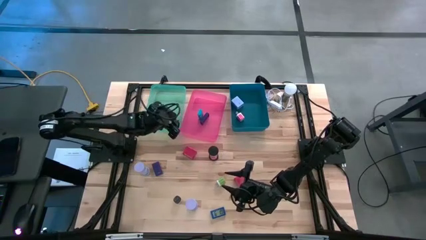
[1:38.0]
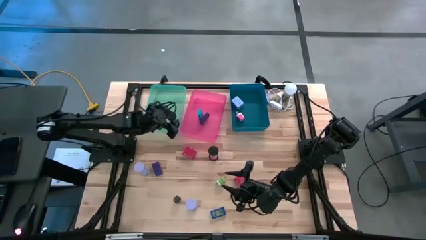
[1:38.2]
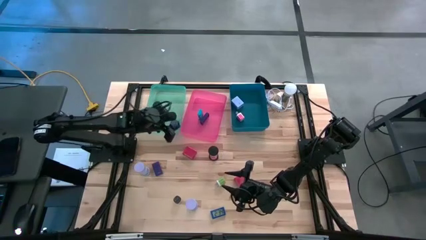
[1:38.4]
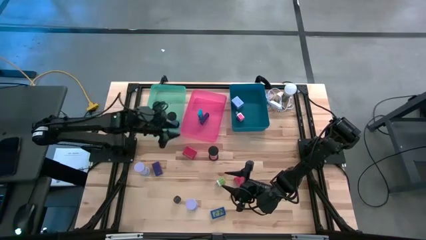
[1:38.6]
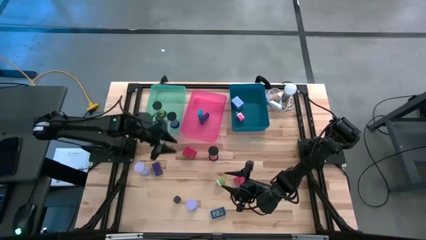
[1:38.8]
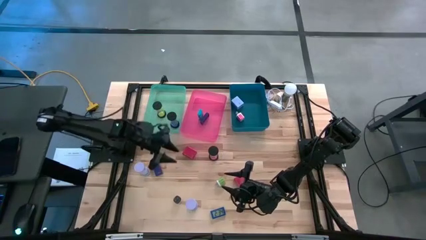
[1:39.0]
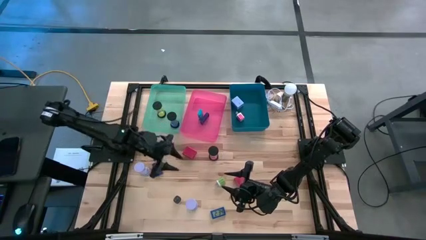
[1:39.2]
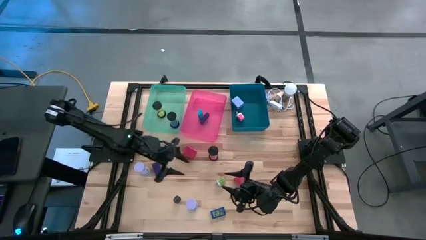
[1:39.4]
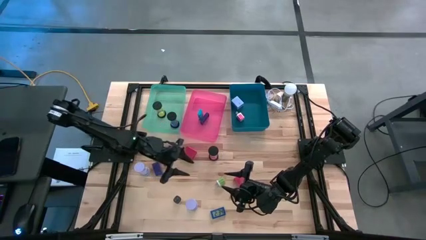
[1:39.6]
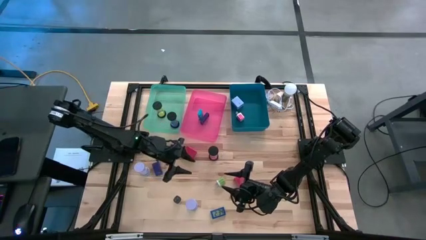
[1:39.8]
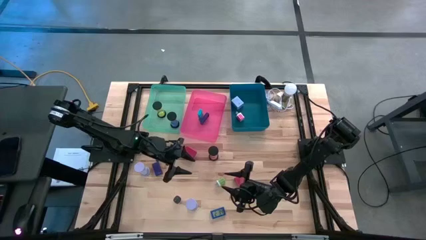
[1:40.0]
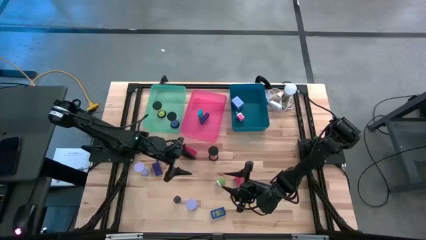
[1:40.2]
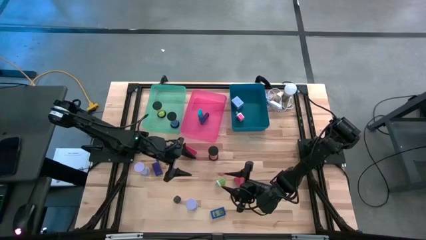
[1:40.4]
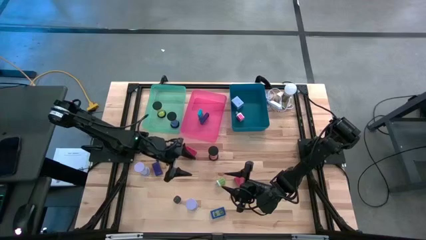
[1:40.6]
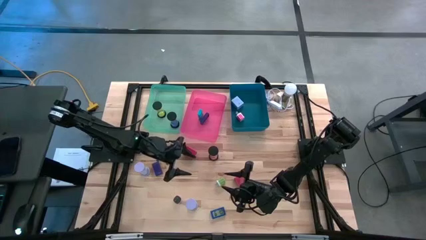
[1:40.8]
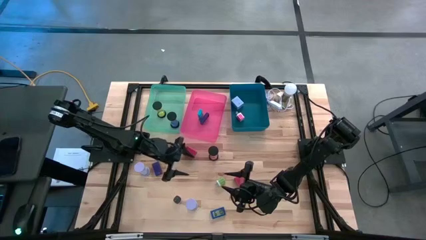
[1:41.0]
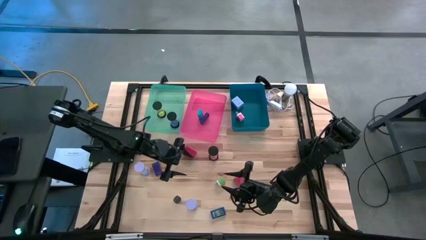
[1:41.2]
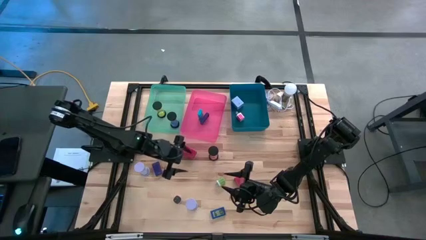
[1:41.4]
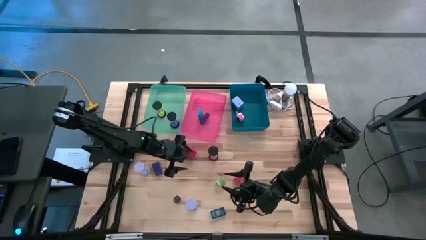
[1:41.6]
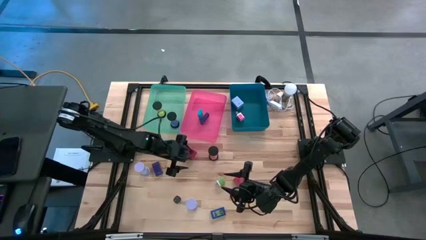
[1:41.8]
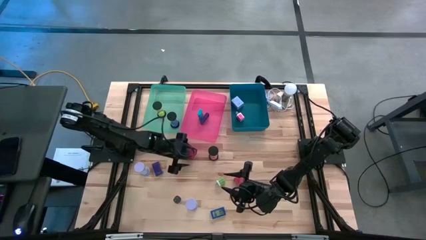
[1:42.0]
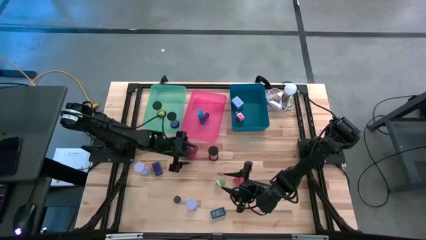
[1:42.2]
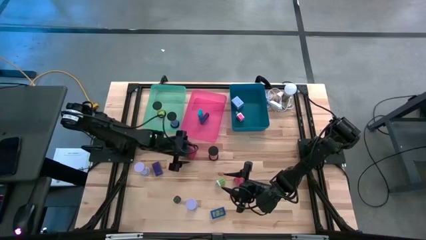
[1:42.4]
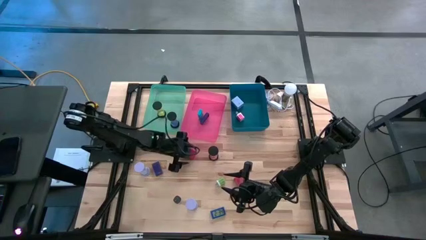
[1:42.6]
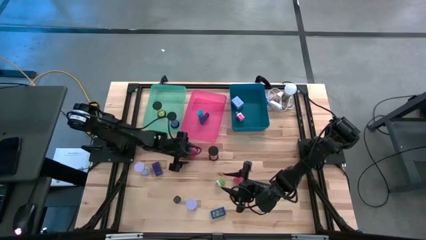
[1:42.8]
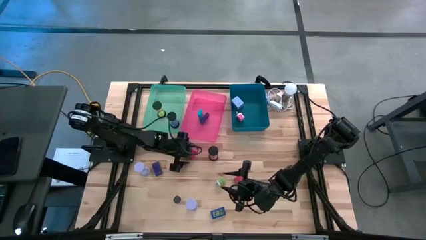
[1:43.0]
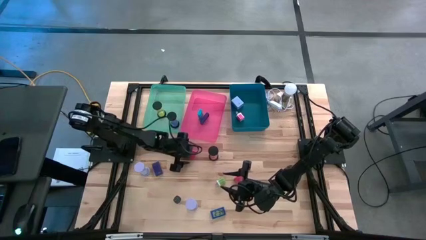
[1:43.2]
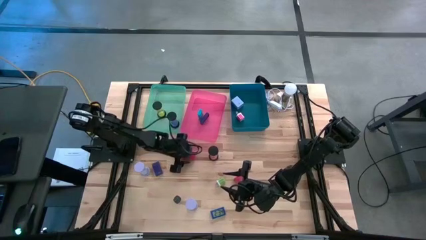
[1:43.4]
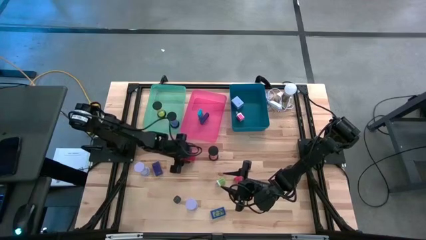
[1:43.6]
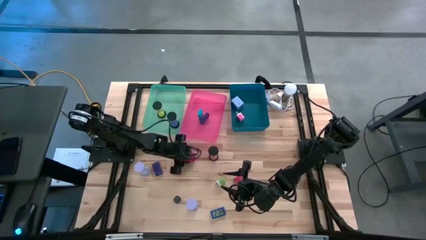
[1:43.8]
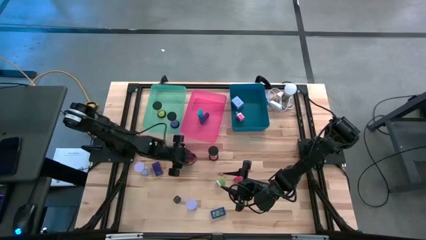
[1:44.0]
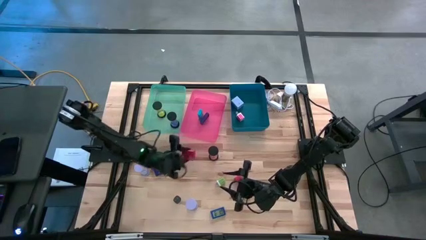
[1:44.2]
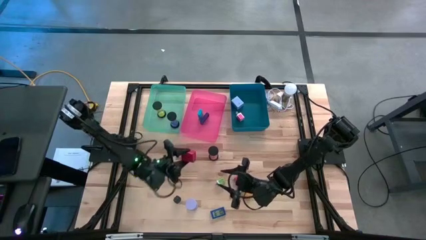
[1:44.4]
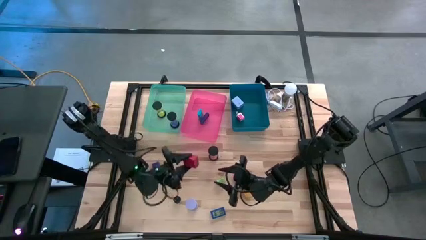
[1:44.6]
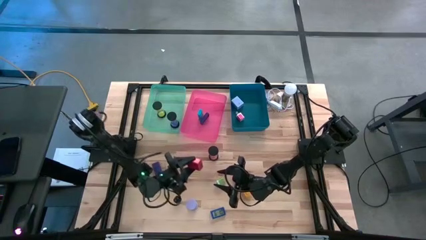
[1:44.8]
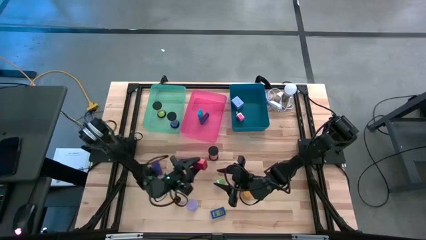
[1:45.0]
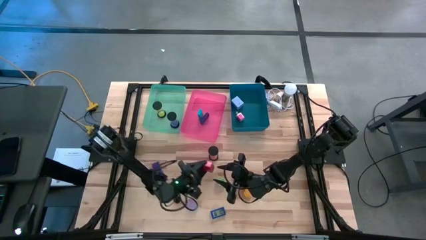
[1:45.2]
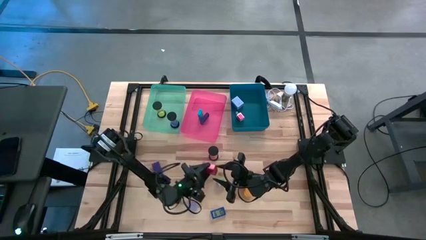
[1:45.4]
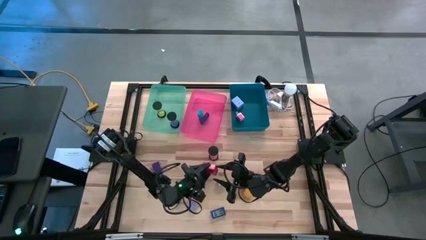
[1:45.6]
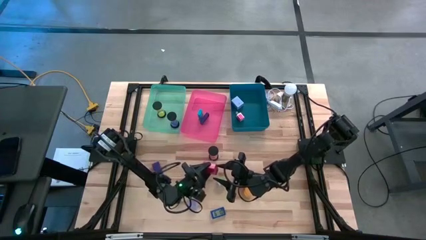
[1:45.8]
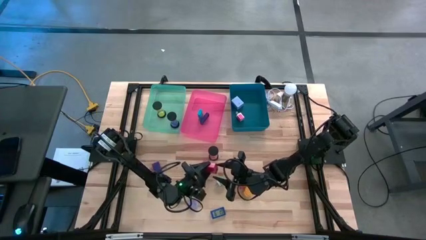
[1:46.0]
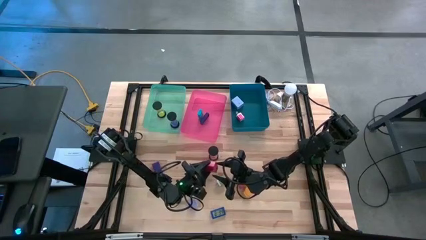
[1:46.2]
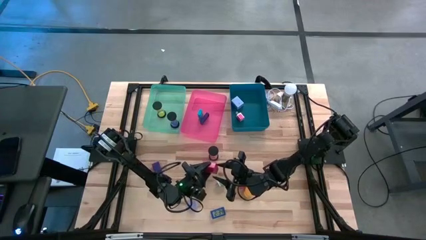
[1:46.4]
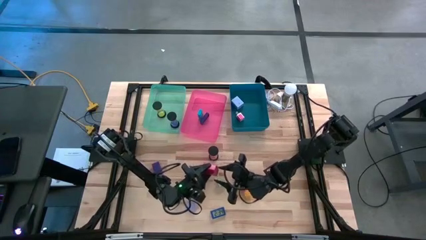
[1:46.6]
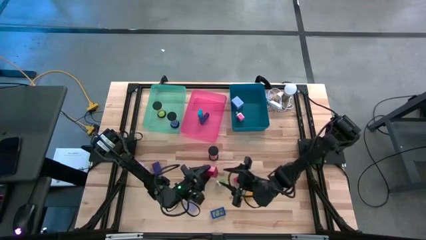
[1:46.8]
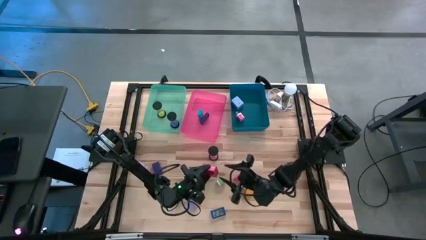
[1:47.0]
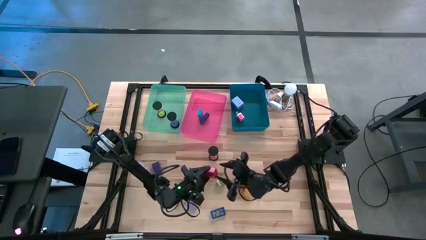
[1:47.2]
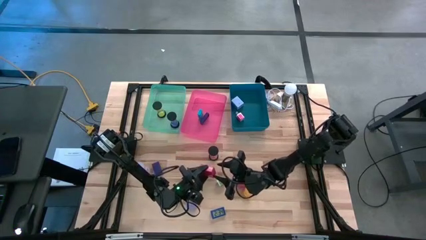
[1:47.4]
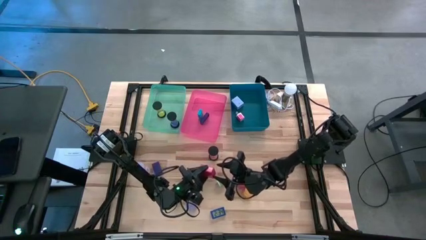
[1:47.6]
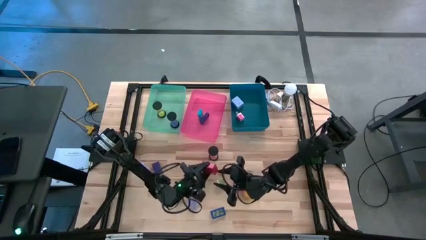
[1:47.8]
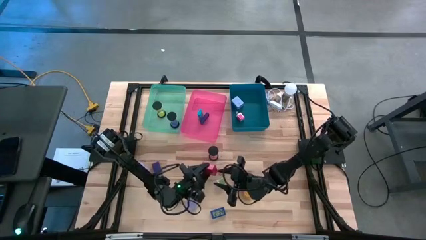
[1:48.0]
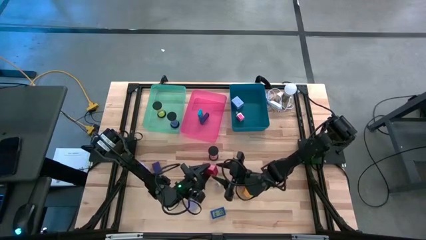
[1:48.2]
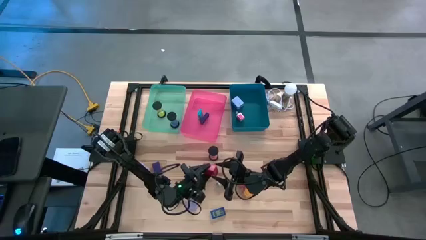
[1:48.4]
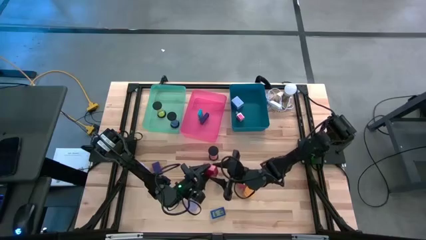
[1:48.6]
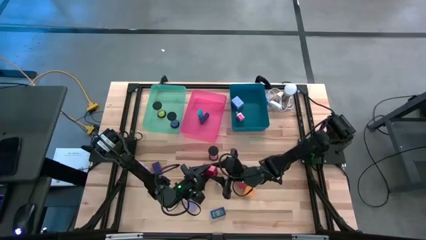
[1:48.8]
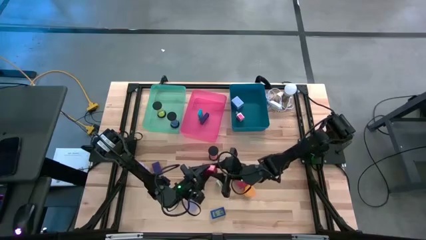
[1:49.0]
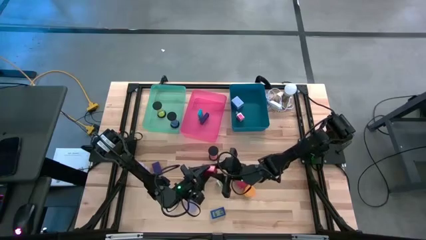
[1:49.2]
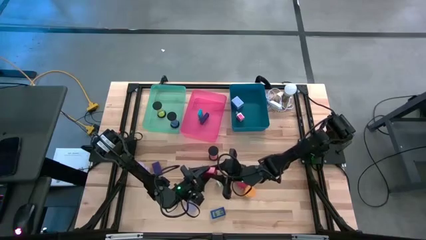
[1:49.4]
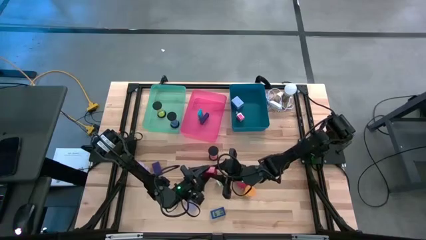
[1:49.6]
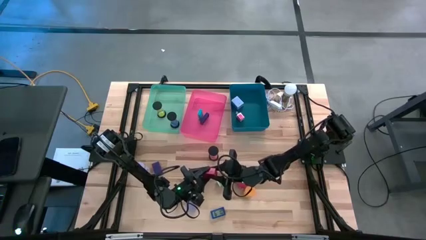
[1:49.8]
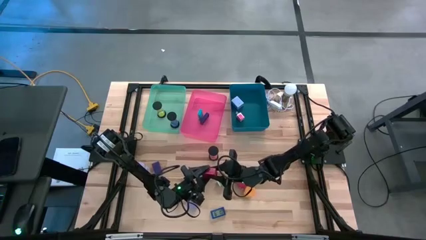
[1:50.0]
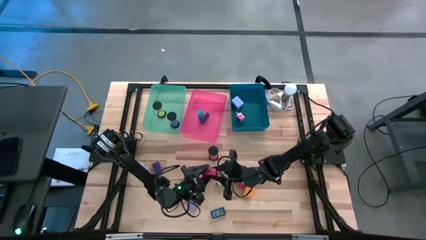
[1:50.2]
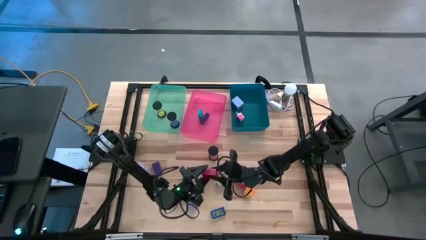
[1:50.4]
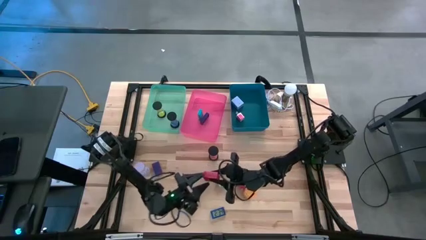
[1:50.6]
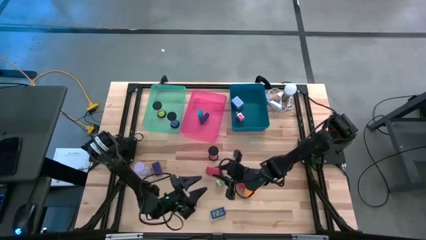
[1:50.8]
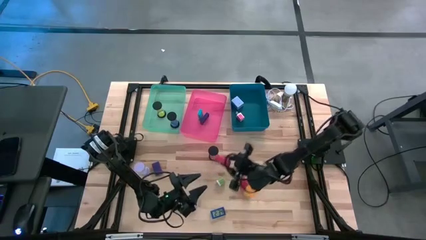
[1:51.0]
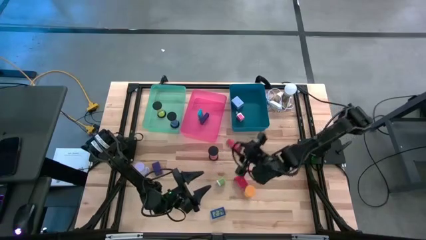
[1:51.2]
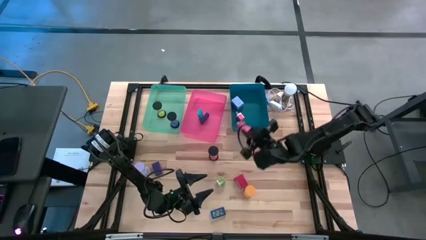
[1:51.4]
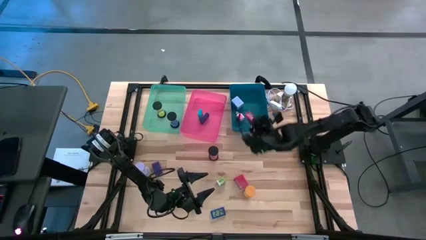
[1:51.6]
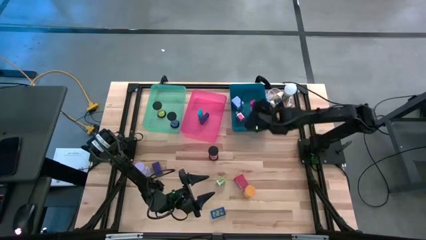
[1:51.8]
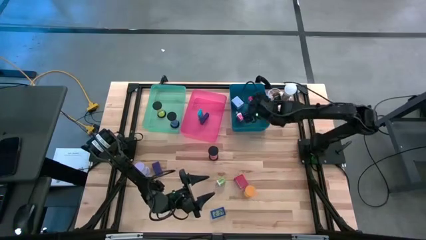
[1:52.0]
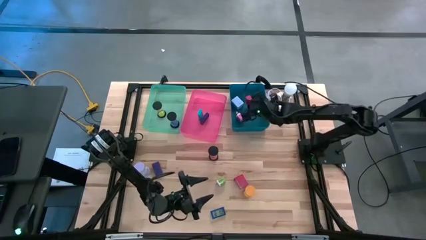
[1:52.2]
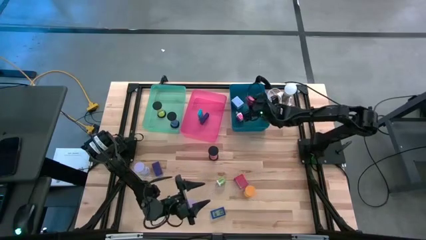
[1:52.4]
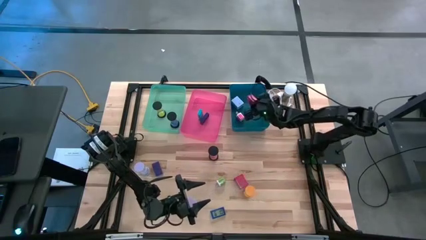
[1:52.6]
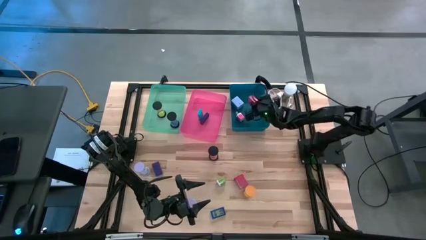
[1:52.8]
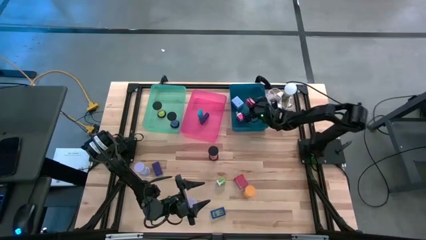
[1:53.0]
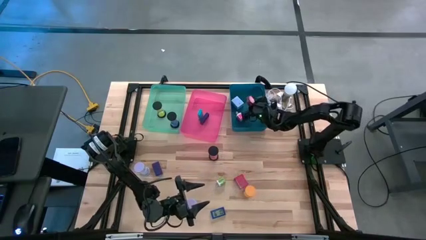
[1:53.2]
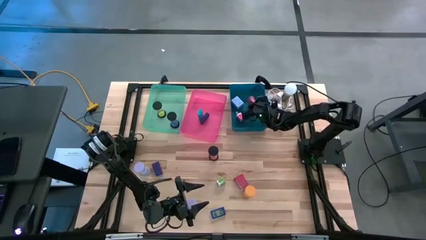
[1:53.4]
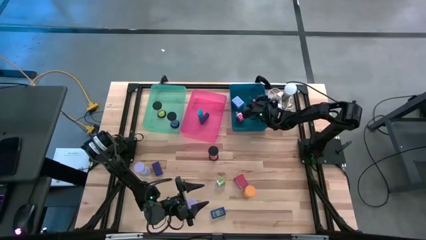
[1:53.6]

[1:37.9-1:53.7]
Task: Pick & Place Office items
Put the top red charger adapter into the blue bin
